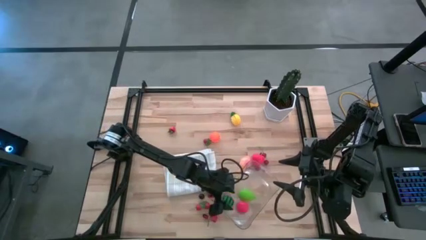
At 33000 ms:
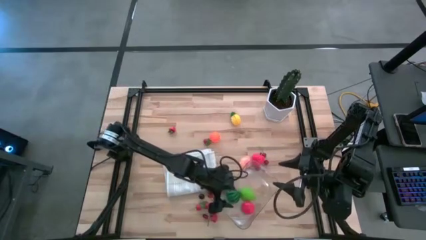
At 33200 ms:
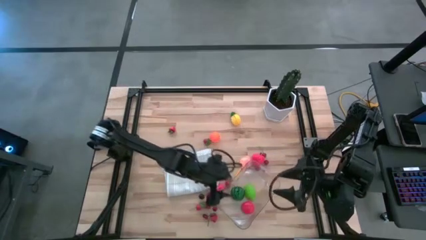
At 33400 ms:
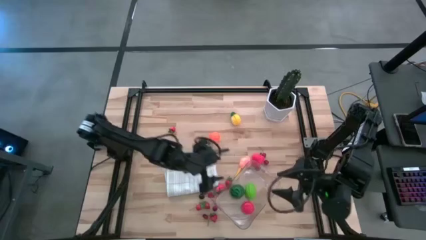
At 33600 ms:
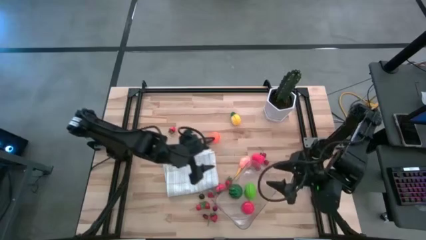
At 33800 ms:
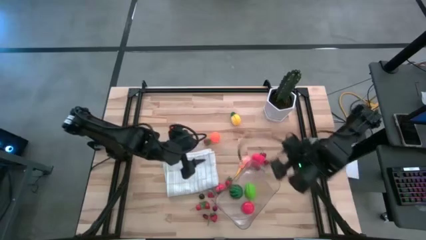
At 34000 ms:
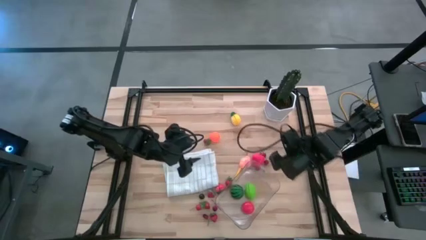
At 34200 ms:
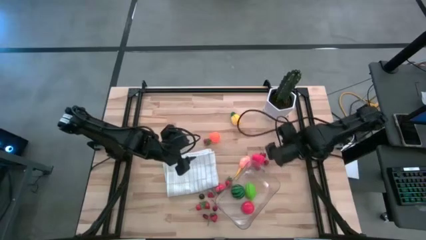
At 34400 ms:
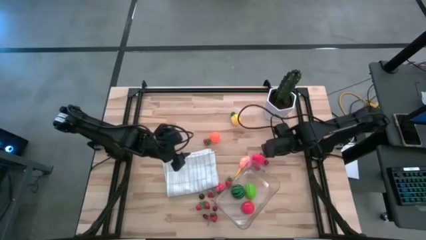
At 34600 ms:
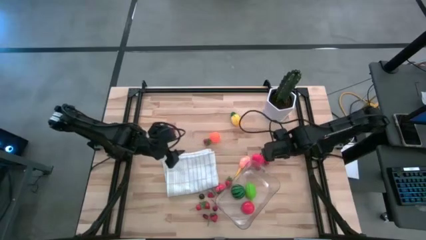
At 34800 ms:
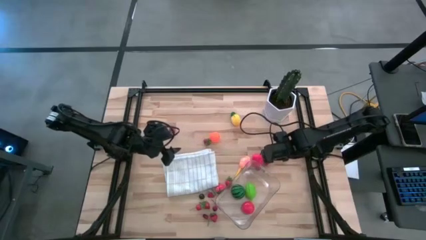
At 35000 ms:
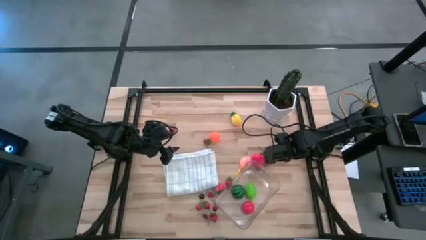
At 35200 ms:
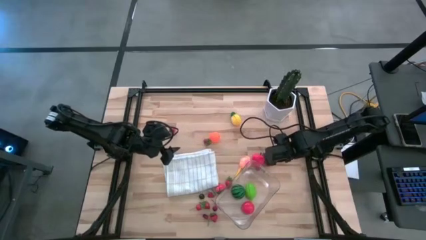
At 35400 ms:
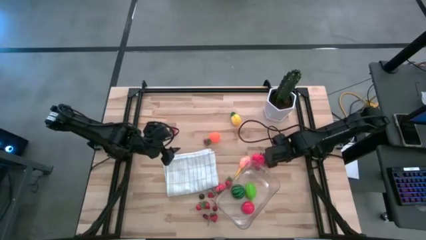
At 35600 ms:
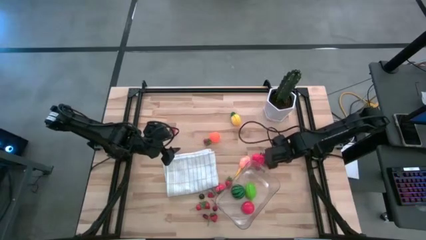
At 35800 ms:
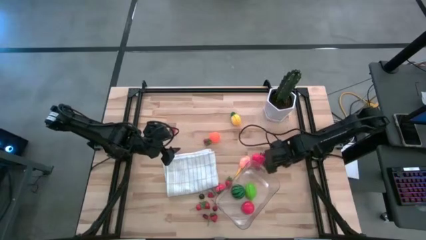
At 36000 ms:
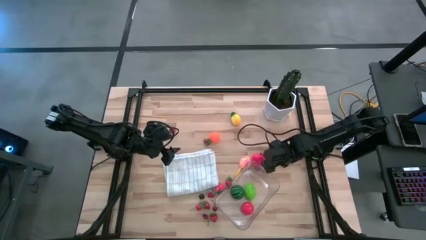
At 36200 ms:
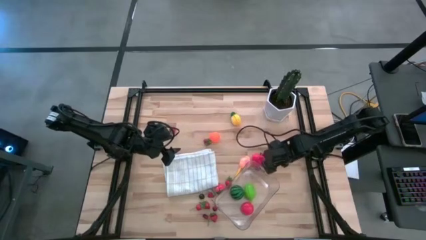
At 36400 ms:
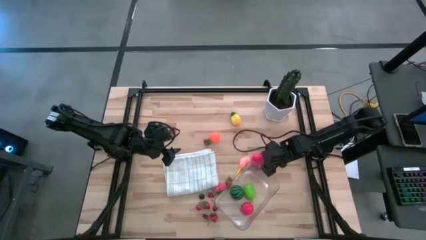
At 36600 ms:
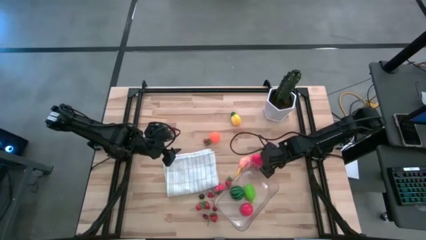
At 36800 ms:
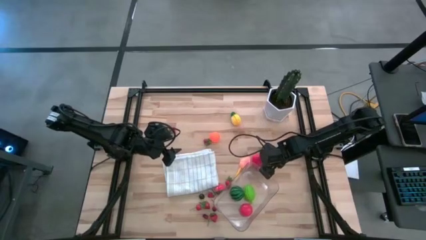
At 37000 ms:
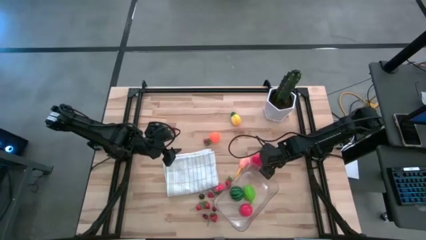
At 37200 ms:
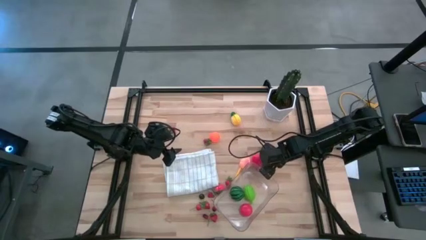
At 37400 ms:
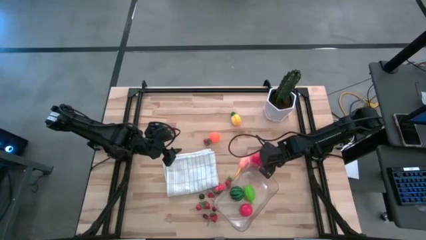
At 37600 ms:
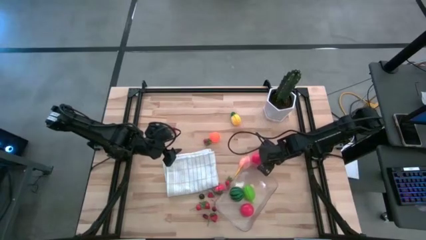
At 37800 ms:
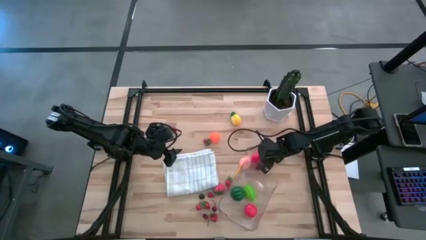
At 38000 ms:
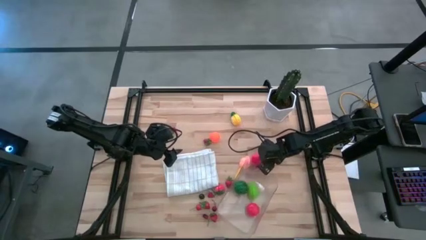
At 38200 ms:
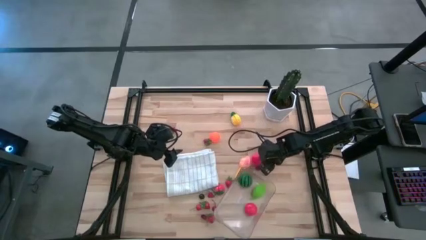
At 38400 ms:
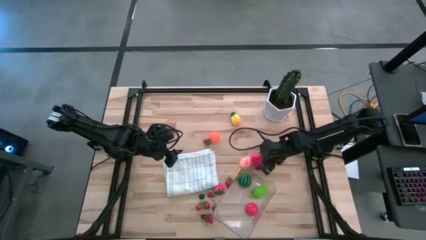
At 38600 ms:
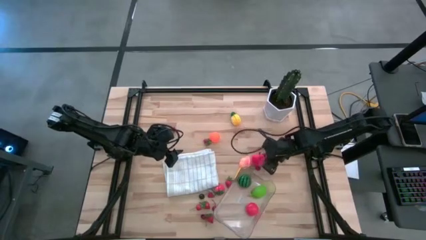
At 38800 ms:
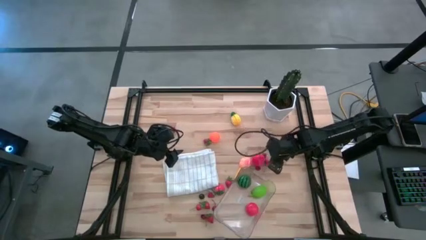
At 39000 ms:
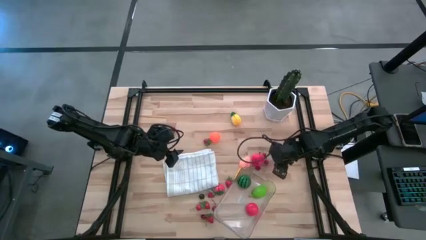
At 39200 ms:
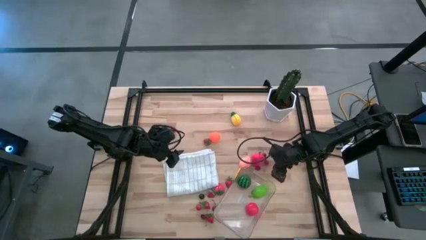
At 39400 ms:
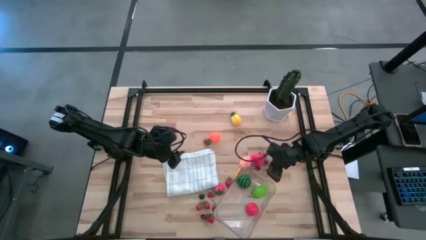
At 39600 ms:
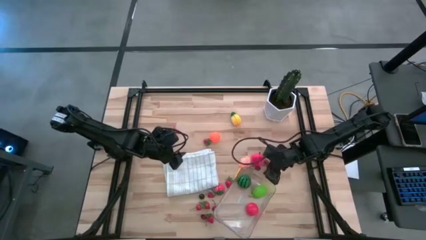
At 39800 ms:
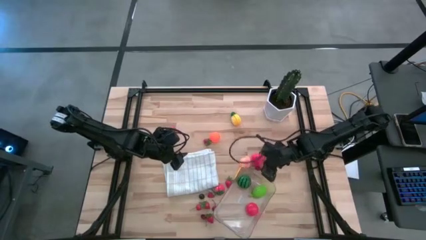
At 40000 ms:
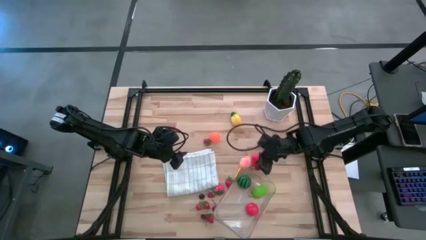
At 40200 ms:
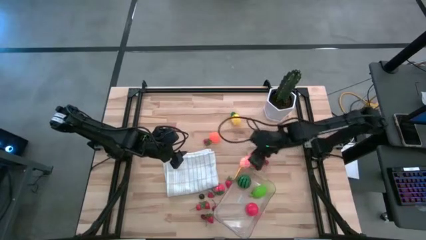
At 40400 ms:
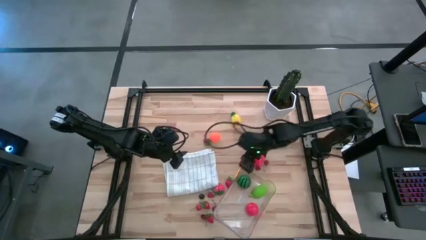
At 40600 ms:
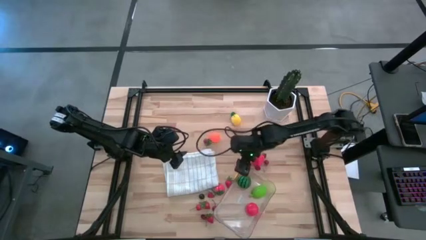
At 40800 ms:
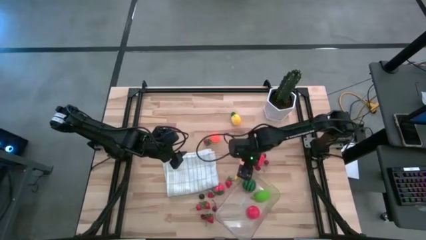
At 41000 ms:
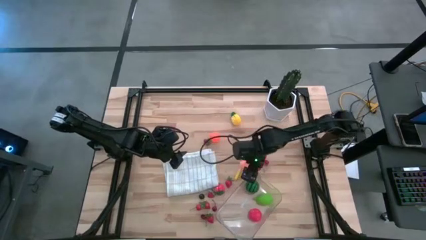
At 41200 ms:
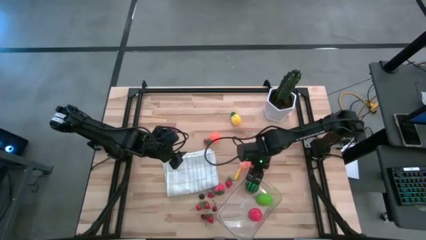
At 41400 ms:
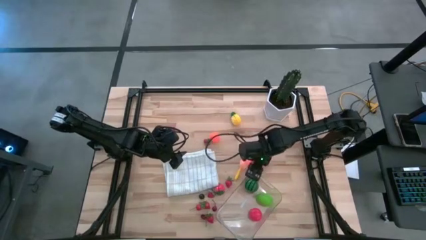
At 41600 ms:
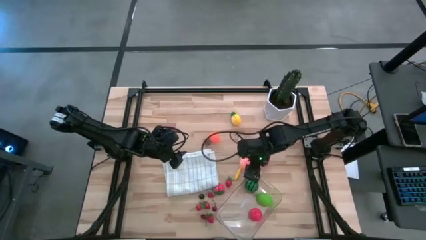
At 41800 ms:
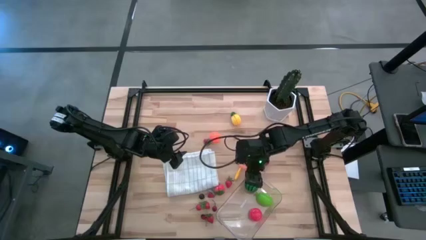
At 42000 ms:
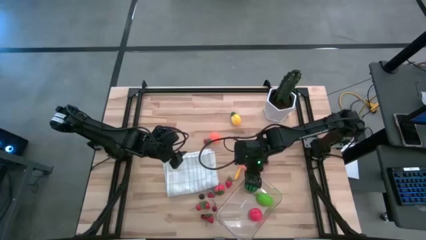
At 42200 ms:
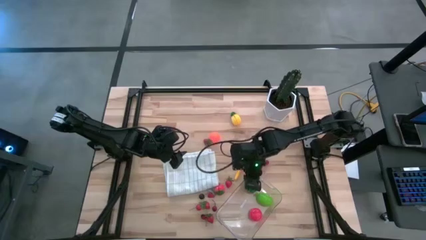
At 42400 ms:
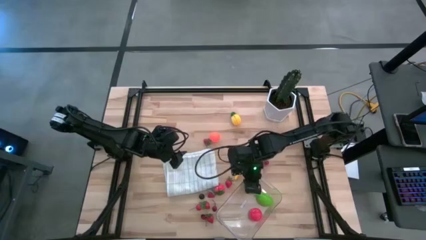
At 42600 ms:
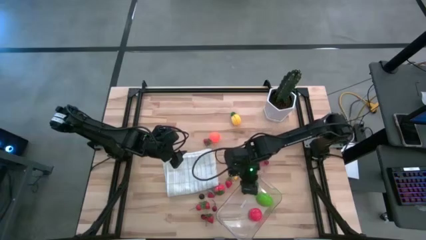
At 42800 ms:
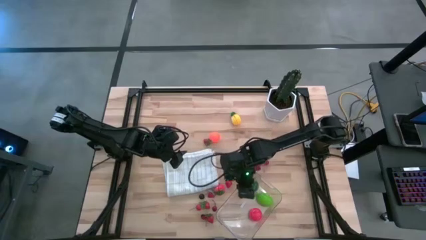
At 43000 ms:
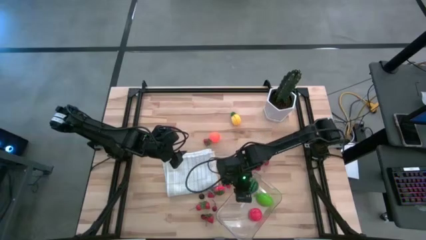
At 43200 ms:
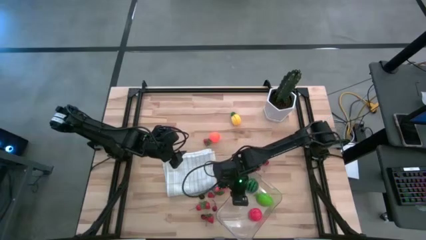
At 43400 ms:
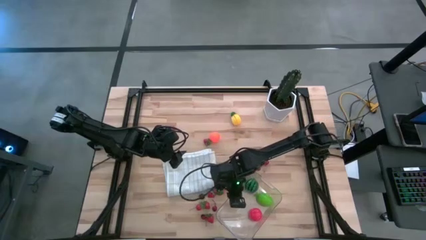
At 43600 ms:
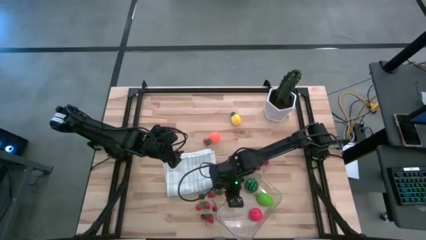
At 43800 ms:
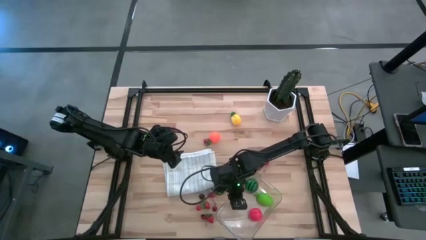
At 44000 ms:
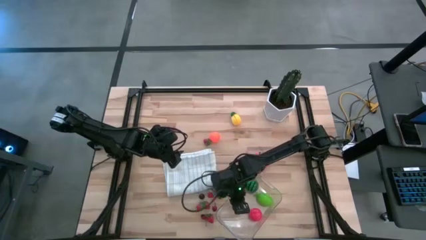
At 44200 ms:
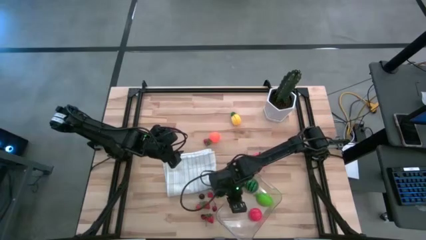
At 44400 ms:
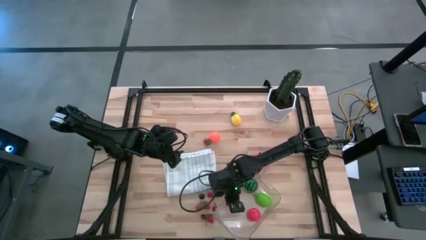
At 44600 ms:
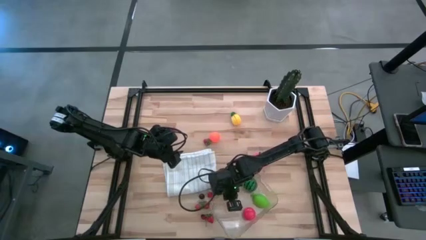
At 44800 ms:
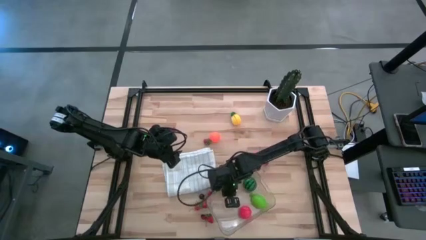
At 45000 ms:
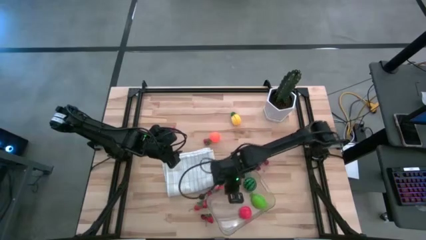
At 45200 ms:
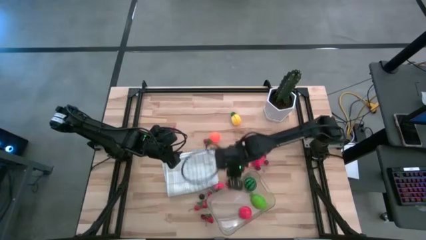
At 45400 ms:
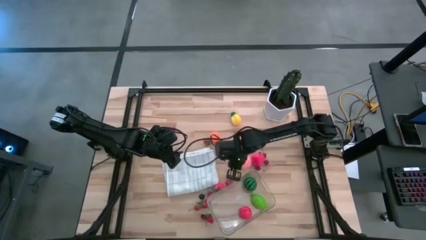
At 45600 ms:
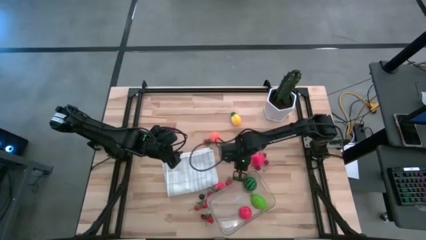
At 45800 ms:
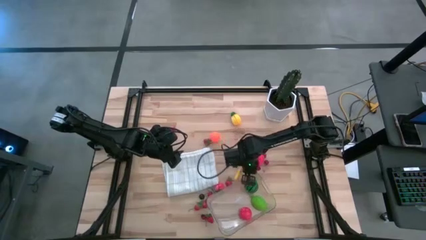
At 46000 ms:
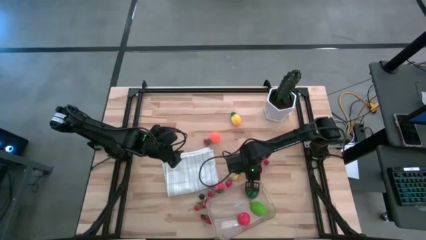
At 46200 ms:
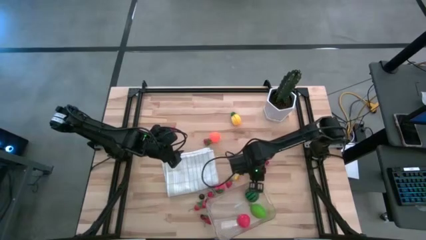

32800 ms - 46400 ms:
Task: Pick and placing Produce into tupperware
Adjust the transparent bin

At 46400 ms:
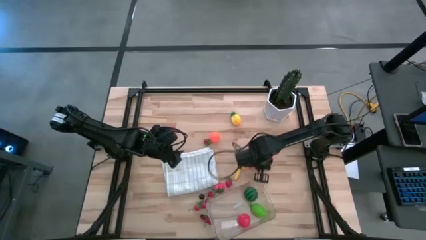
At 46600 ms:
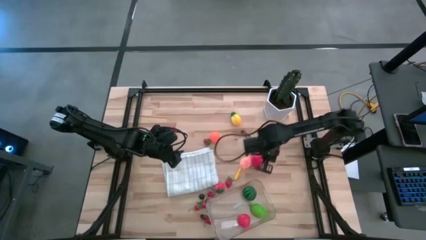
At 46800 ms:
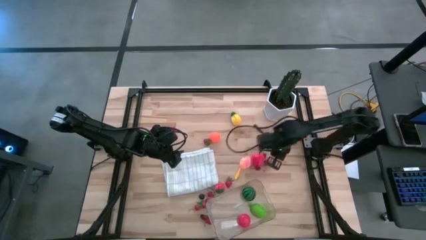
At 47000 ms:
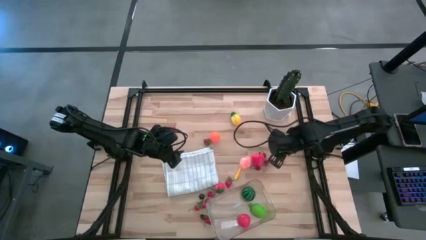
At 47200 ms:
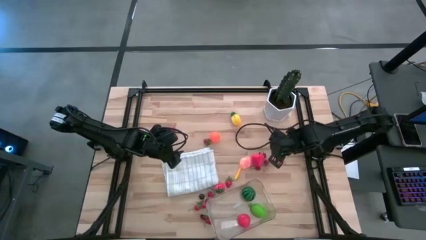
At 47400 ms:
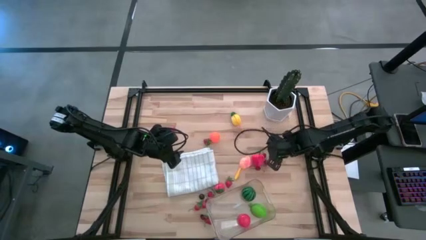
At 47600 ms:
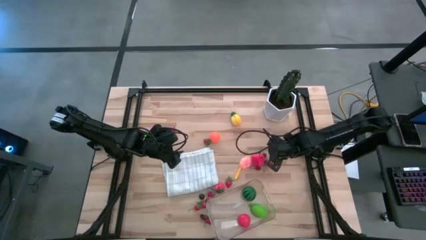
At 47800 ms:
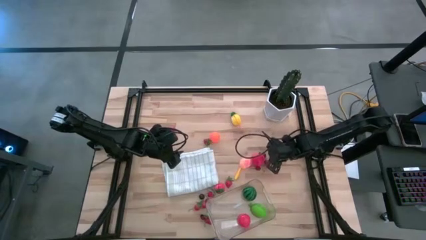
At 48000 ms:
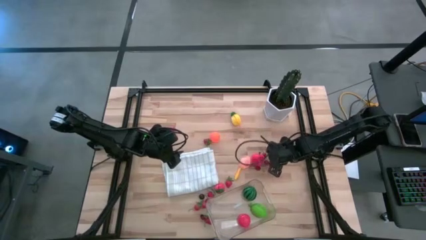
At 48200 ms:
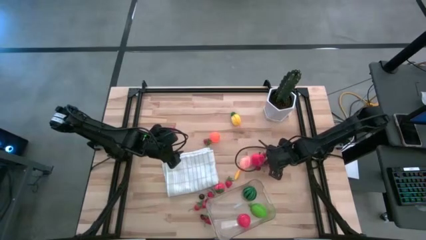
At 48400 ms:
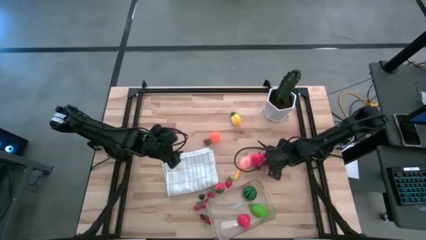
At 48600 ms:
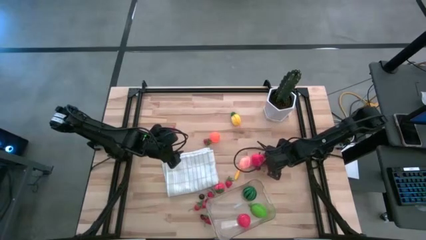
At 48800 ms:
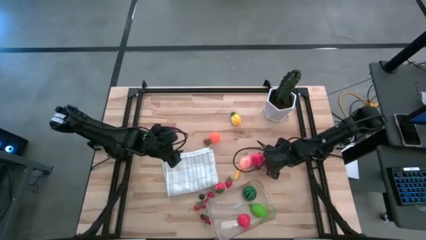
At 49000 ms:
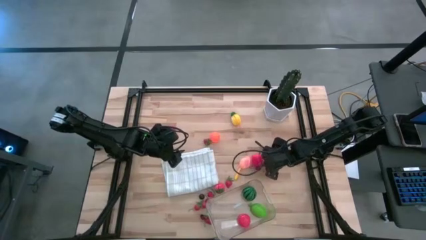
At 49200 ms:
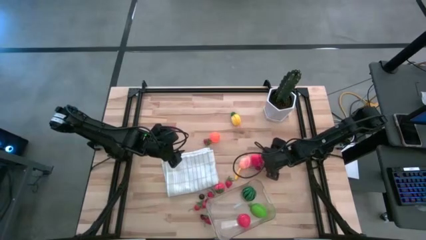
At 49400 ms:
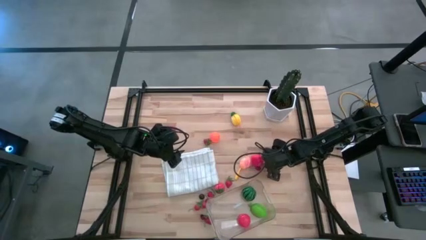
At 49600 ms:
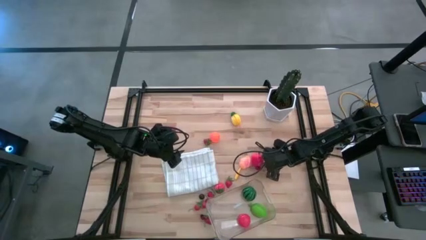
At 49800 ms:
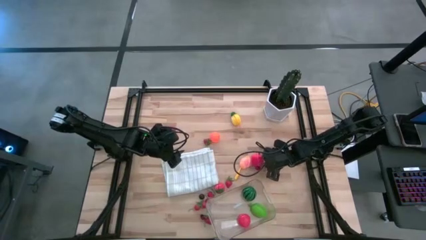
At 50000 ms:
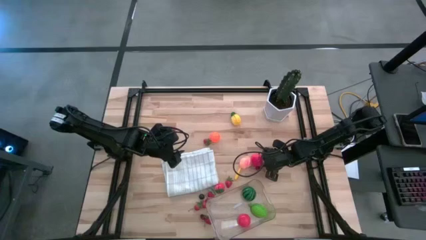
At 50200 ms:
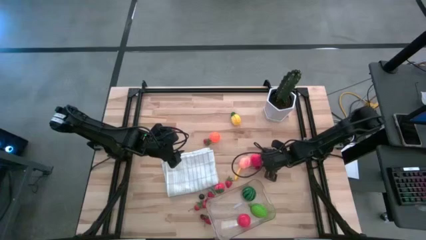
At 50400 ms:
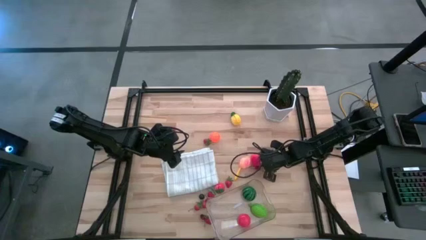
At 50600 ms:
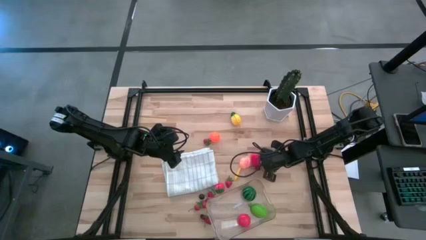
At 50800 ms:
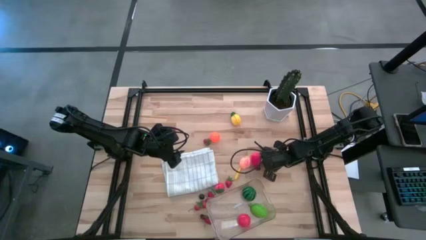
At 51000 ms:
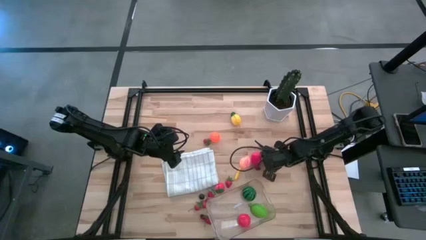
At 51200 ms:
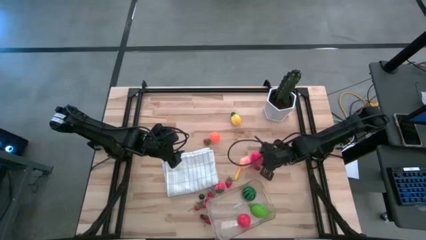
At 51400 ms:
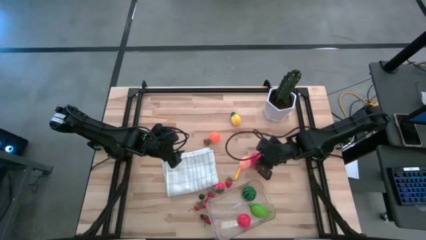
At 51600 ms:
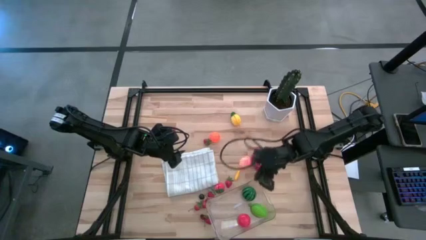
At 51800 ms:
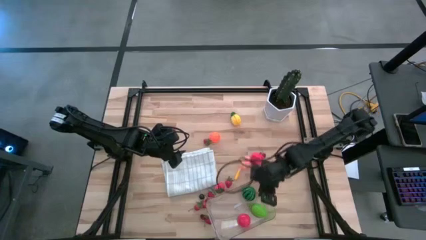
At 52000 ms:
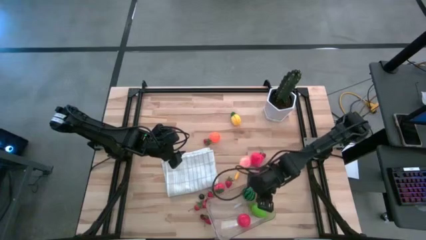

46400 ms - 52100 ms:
Put the red cherry into the transparent bin
